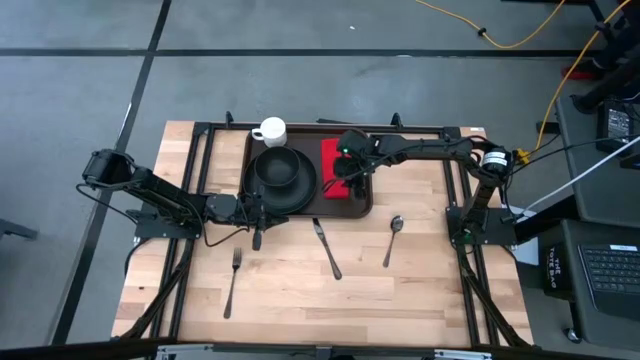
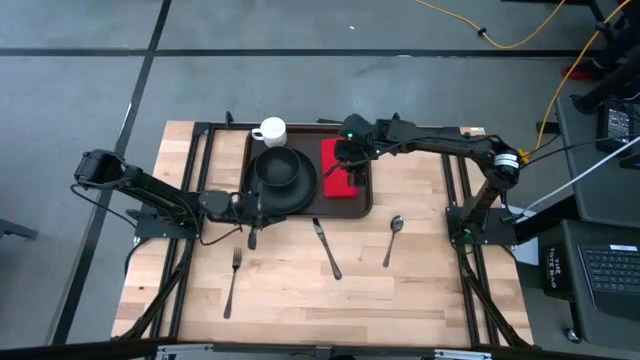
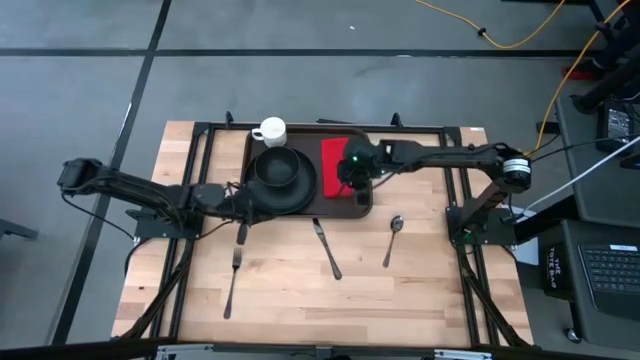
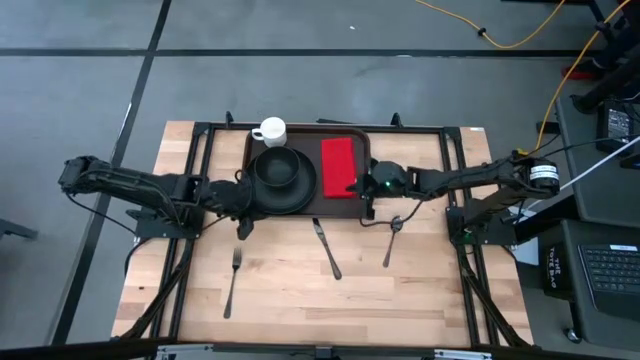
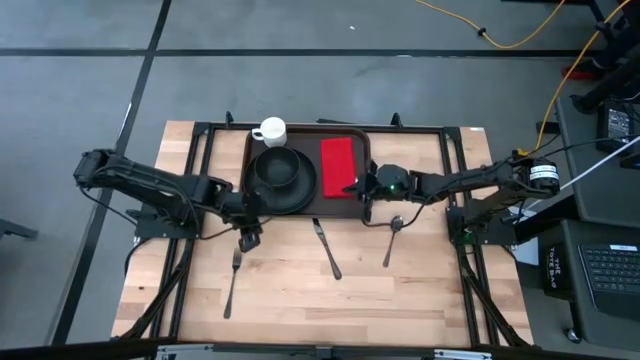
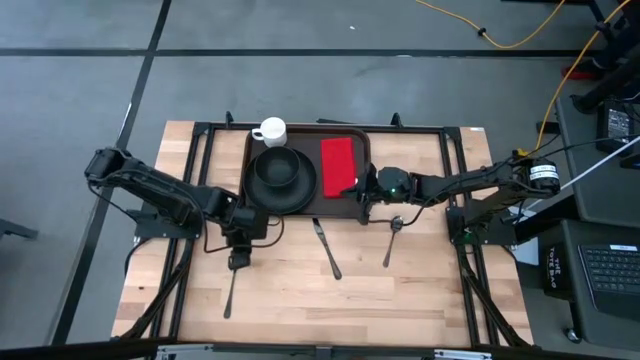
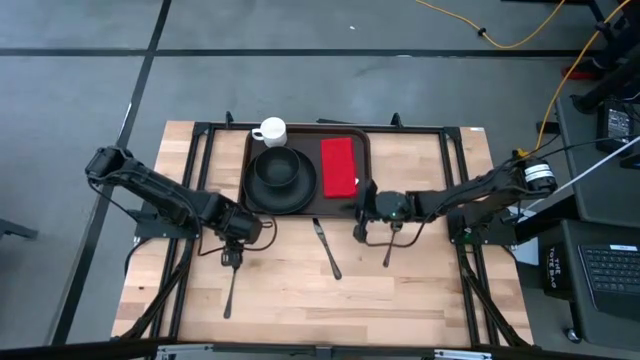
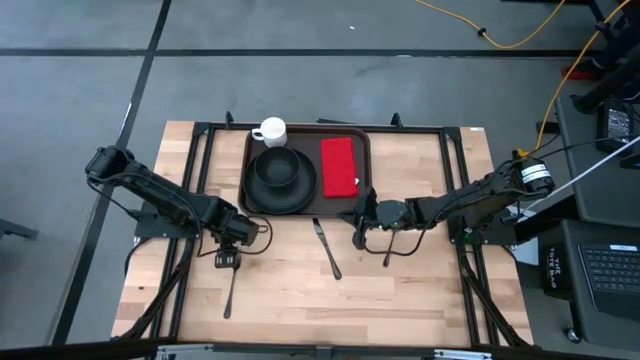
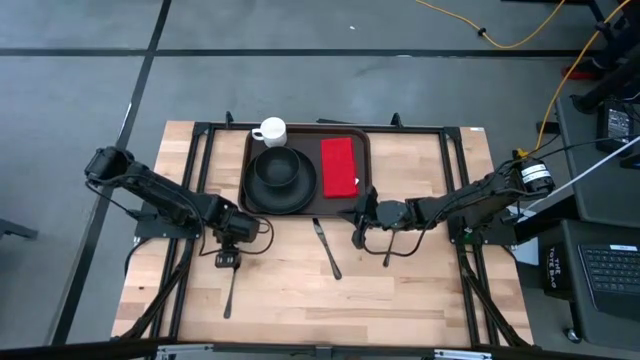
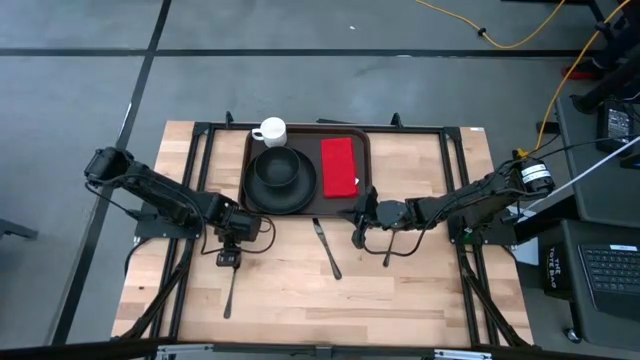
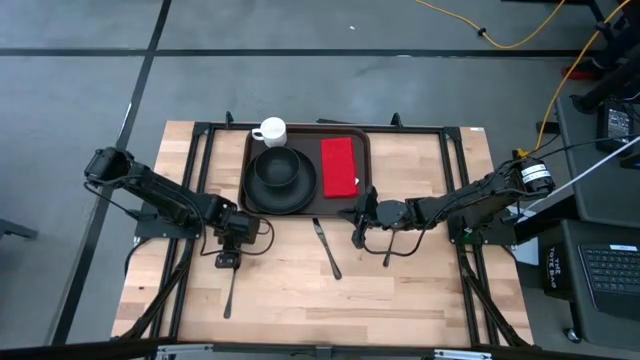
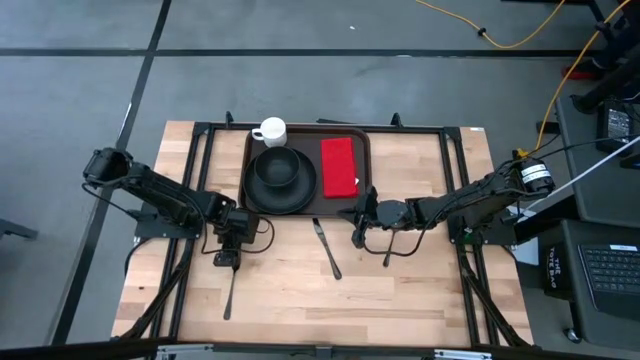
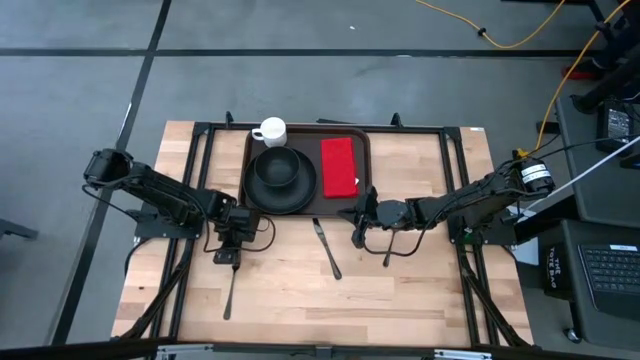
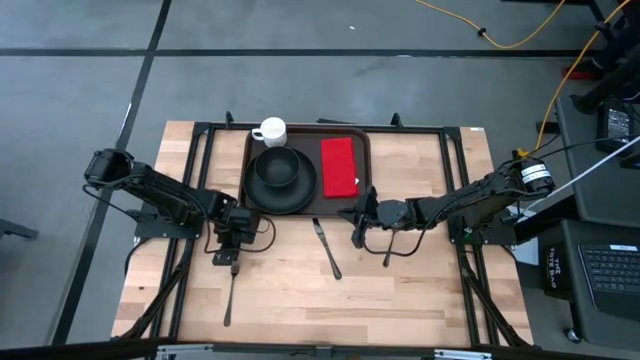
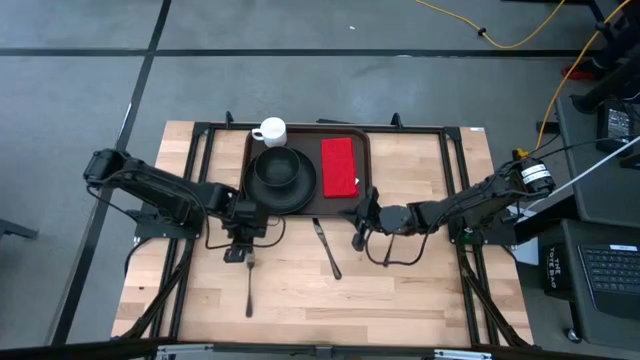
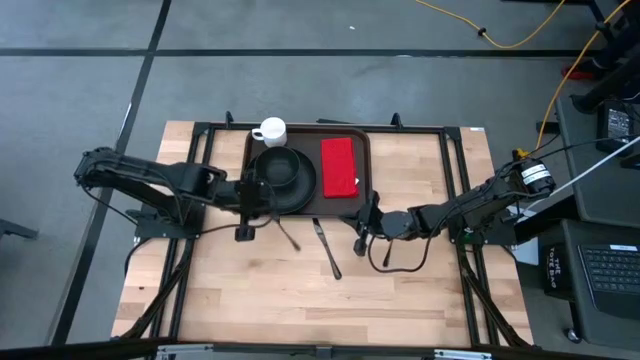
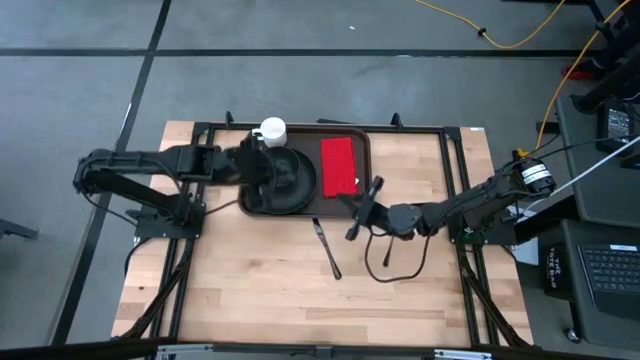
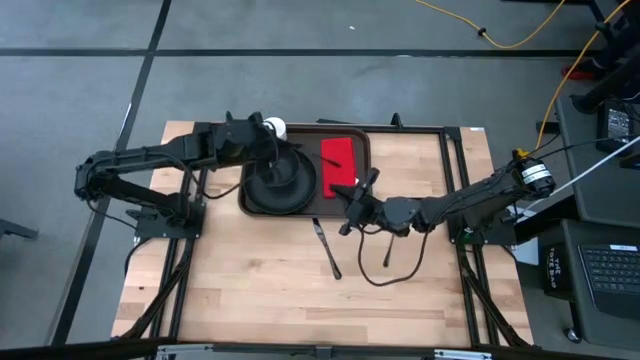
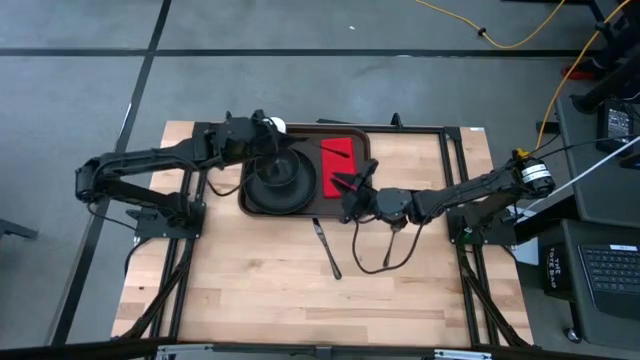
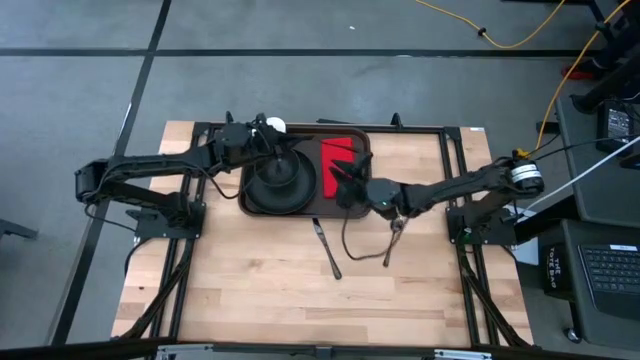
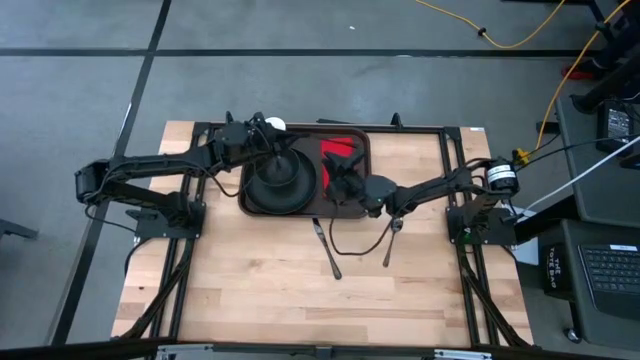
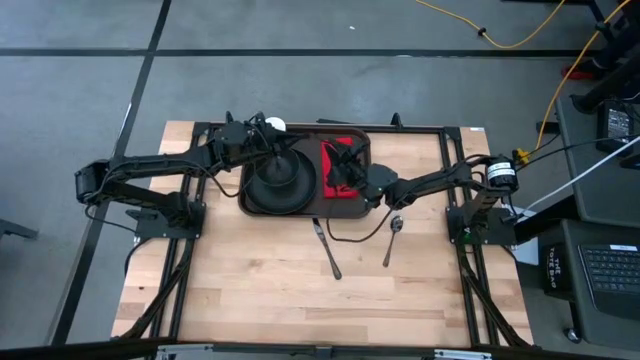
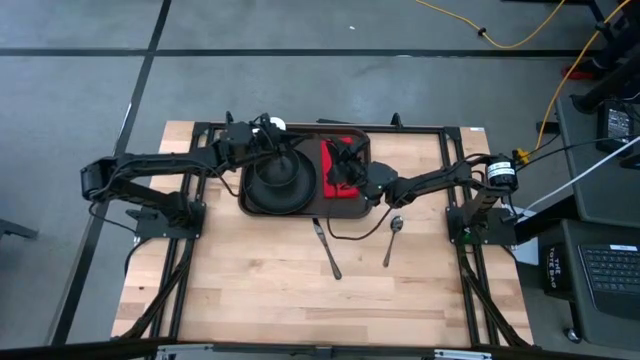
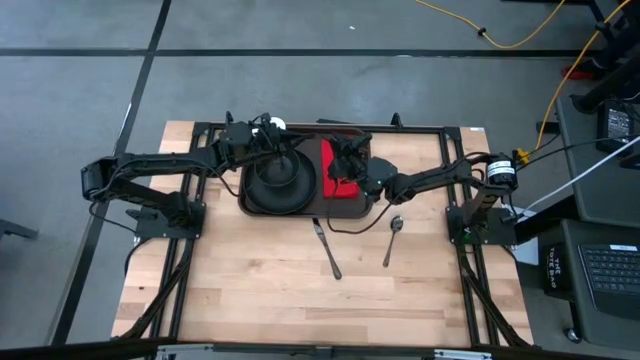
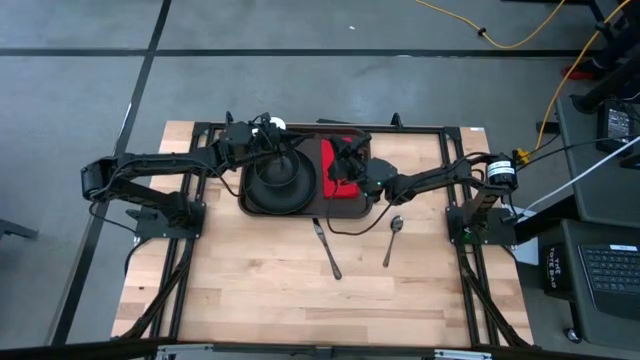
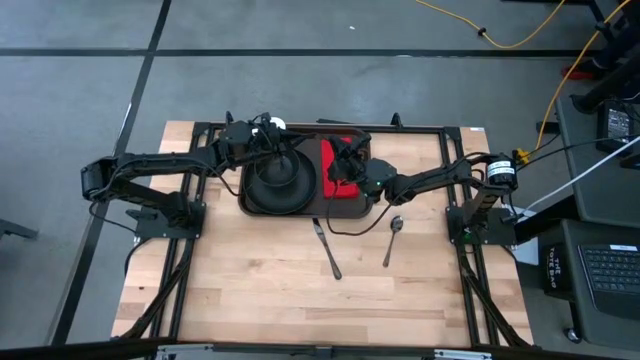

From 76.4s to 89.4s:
Task: Set up tray
Put the silver fork on the red napkin

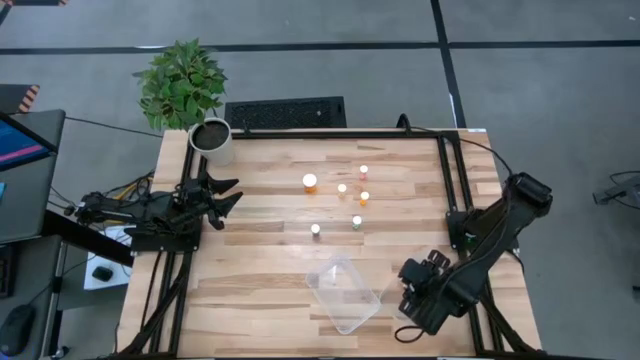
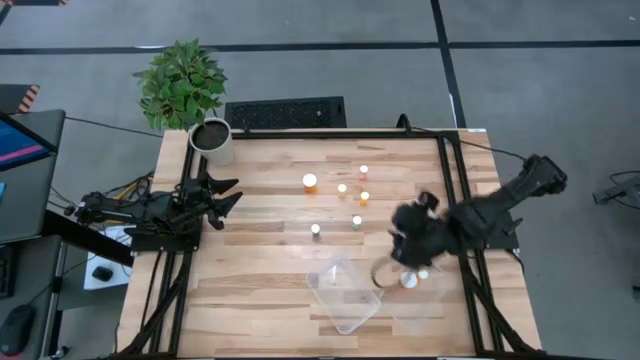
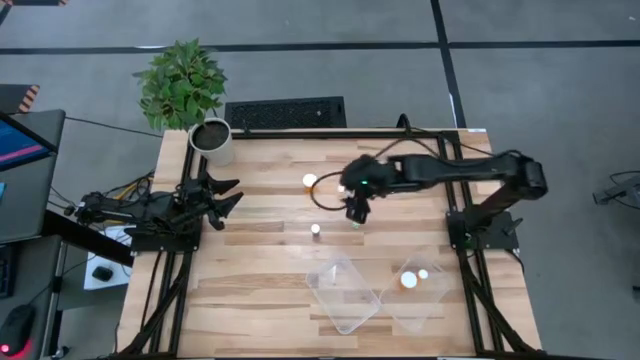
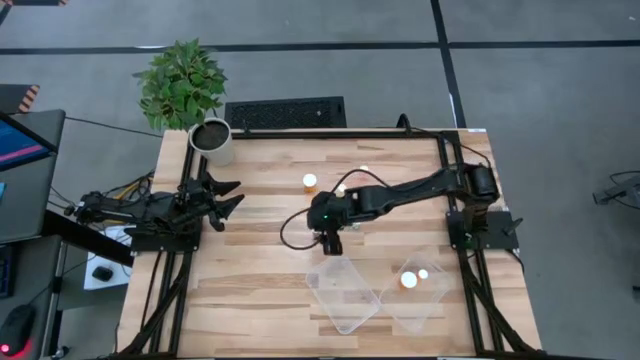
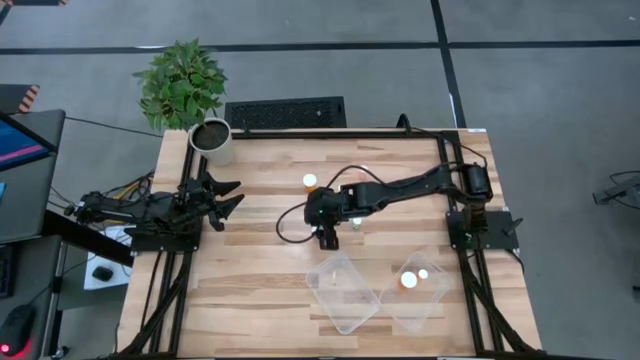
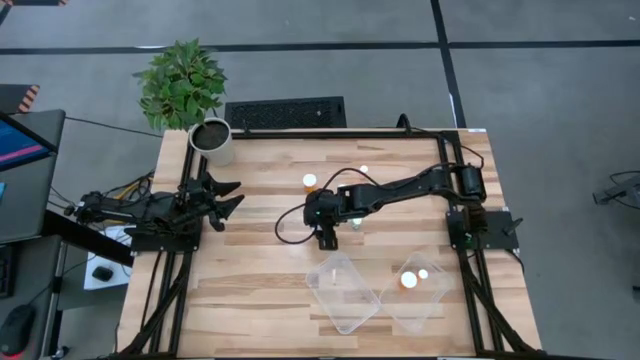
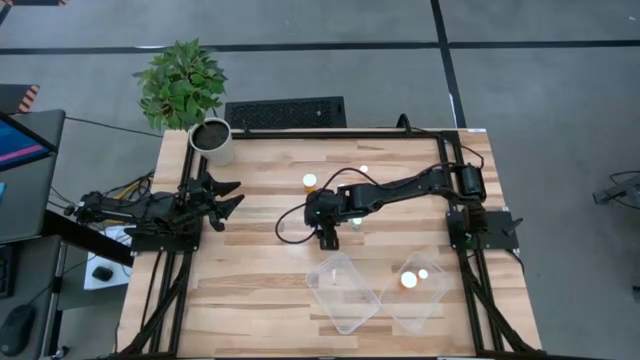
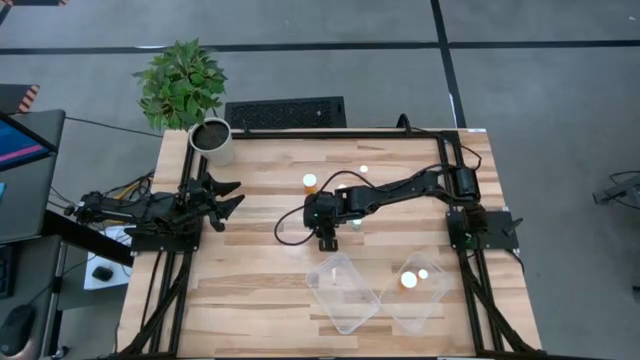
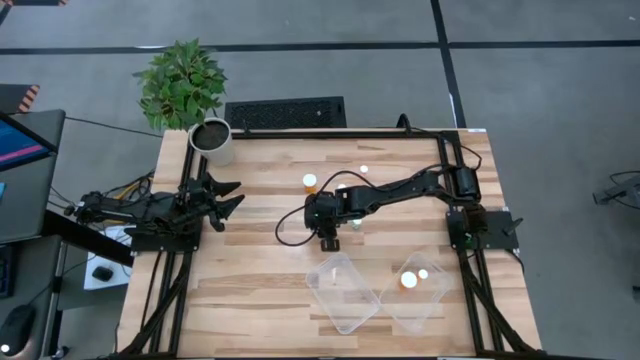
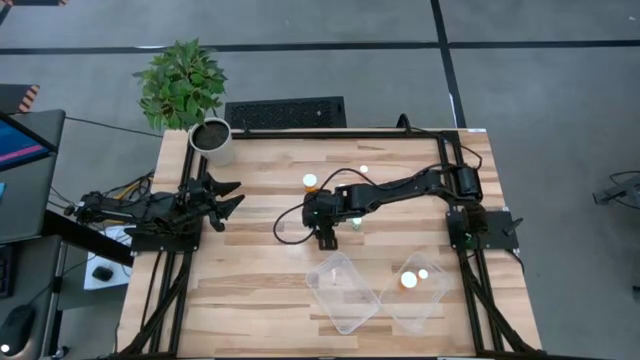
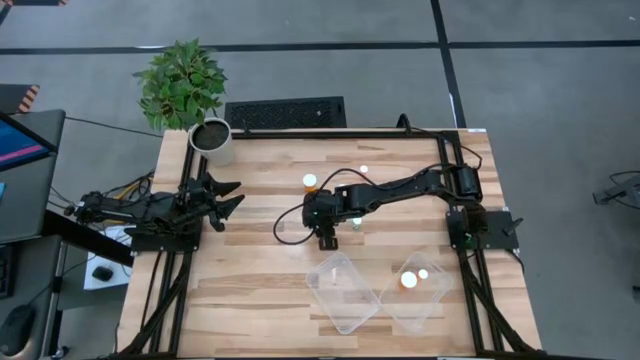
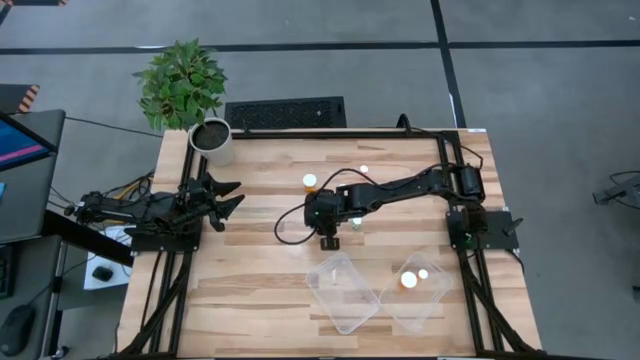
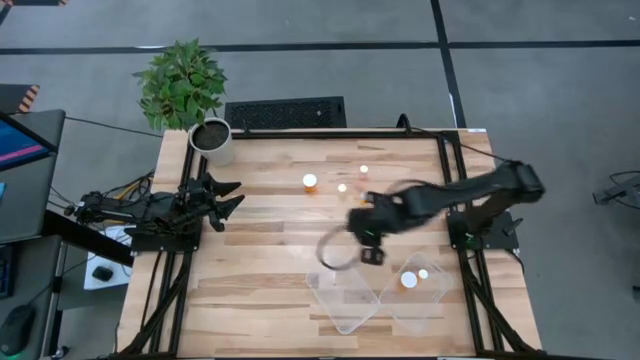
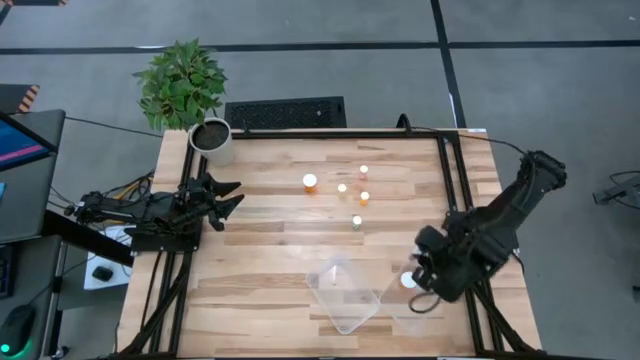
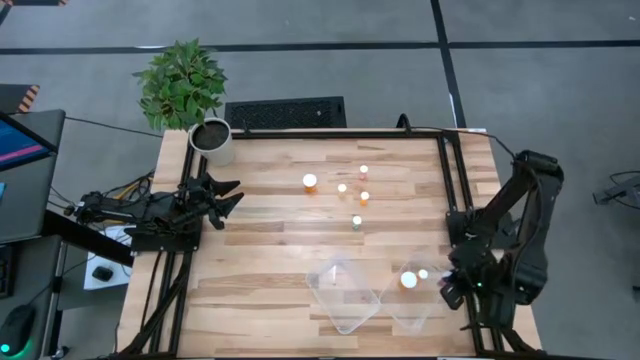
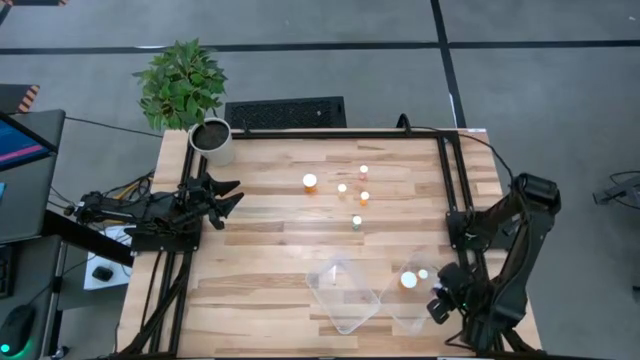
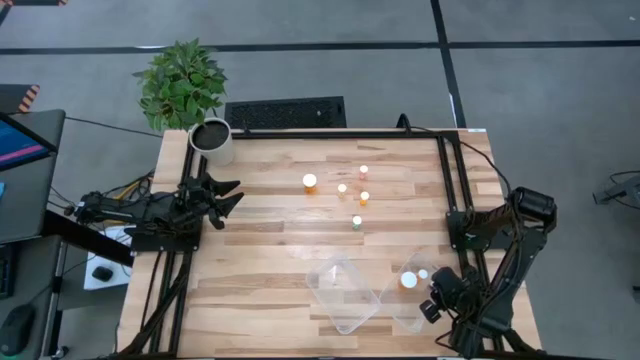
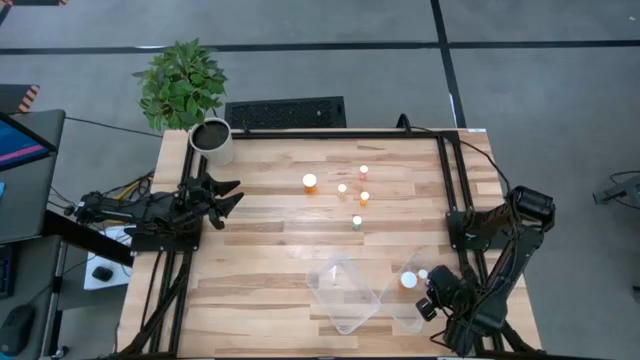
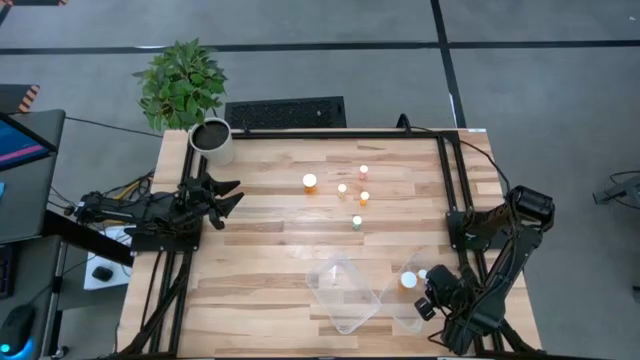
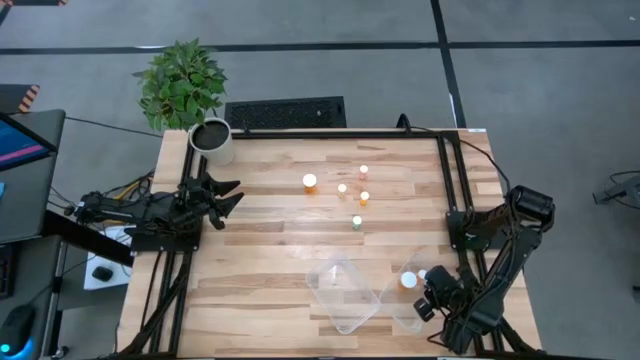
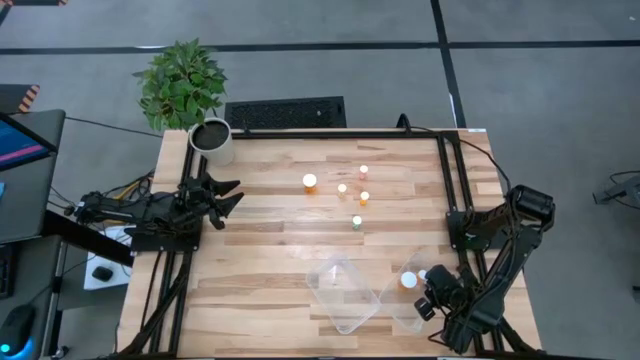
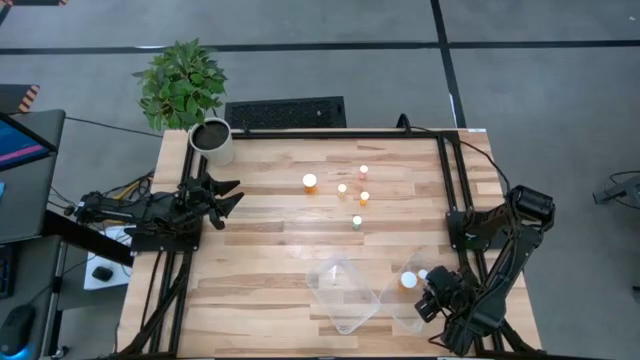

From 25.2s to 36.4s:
Task: Pick and place medicine bottles into bin by pill shape (circle, oval)
Put the transparent pill bottle into the right transparent bin
